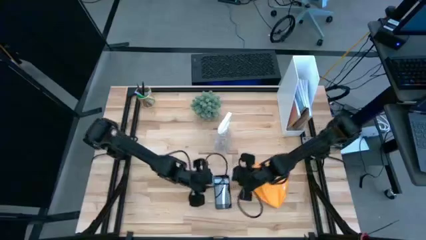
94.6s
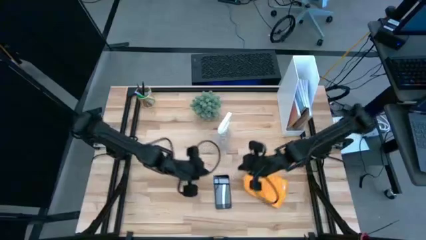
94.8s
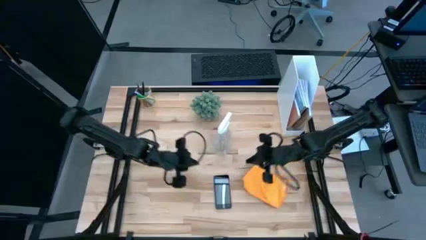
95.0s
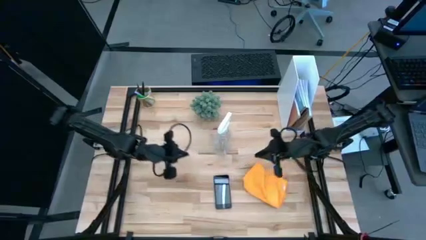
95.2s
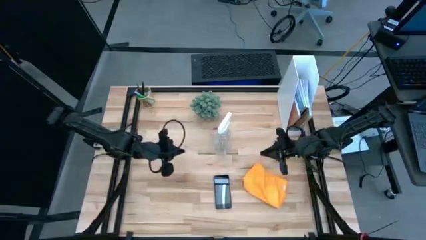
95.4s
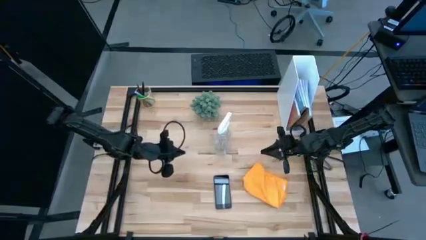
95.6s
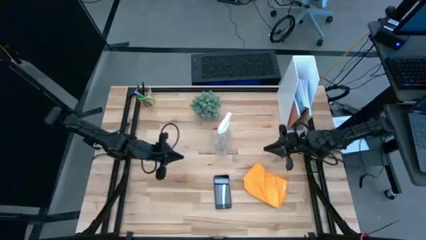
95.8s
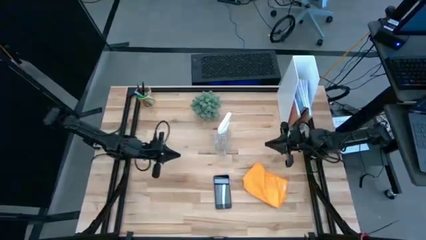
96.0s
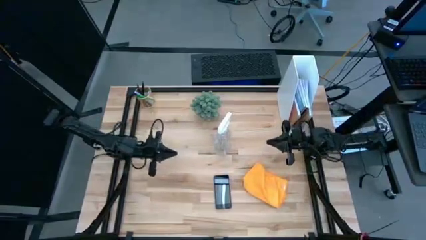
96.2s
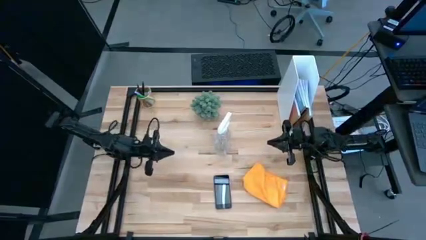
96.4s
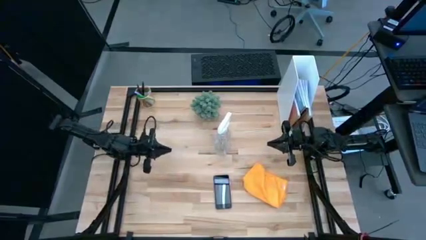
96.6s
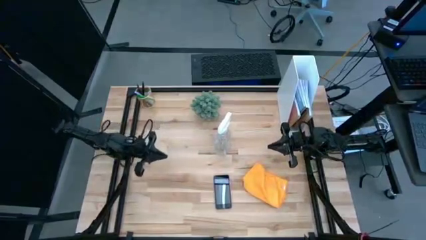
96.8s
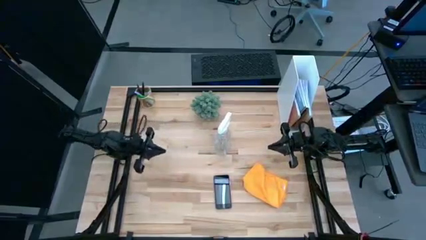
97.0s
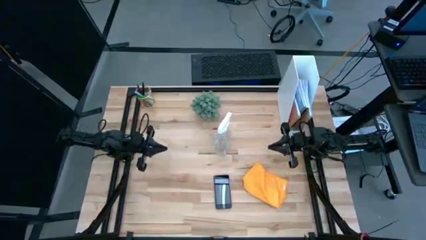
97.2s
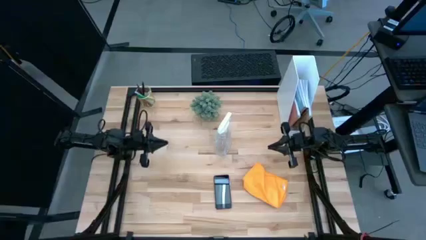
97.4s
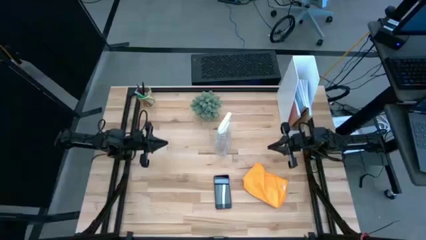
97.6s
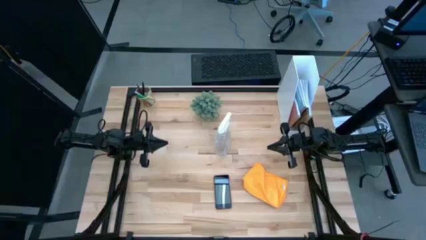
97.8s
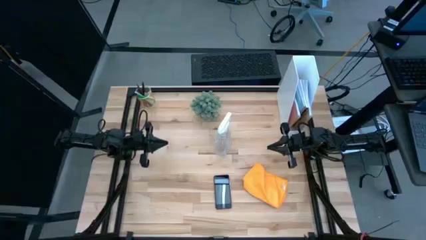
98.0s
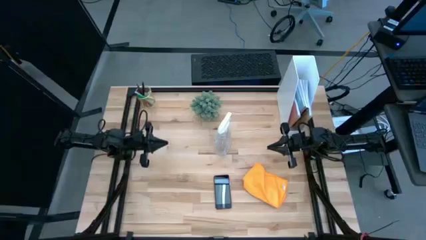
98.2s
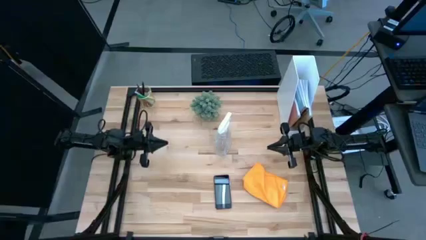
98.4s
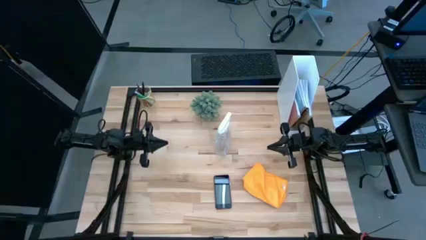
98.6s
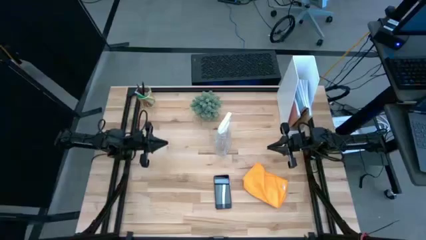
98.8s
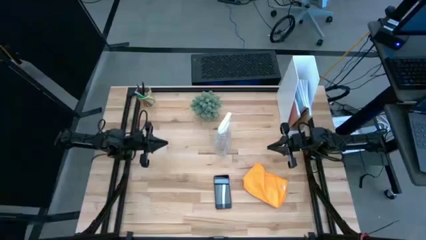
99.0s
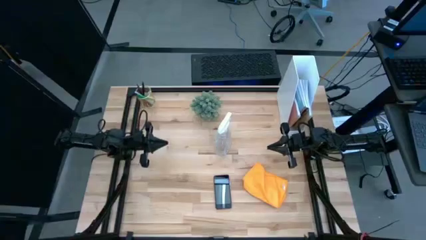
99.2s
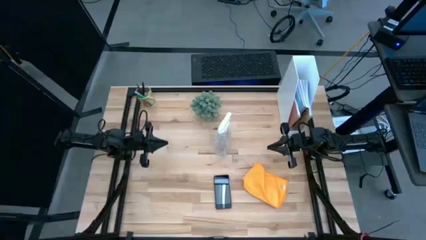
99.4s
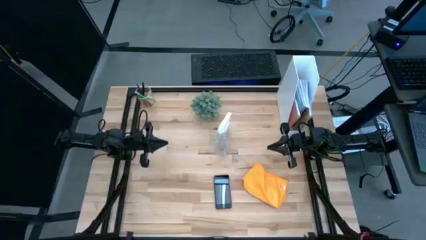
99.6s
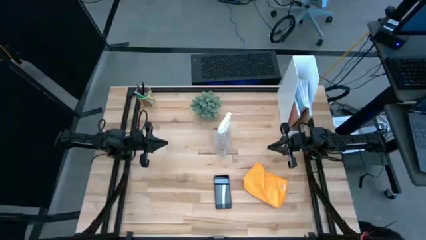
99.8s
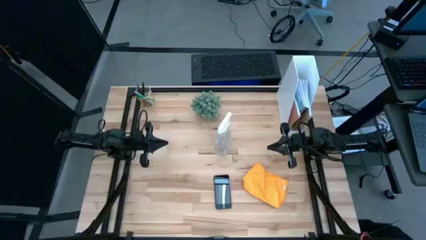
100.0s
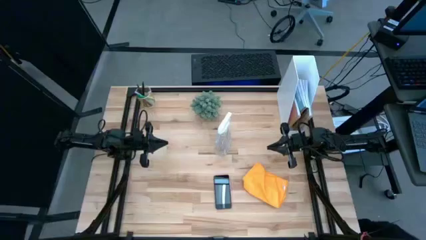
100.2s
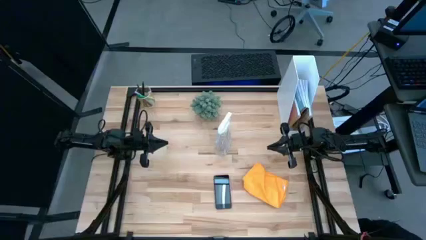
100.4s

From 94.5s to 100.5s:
Task: Apply microfiber cloth
Return to home position

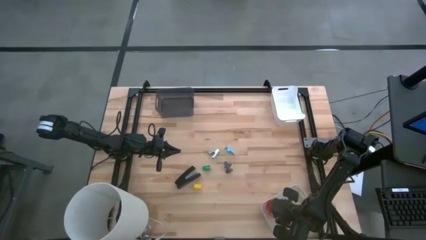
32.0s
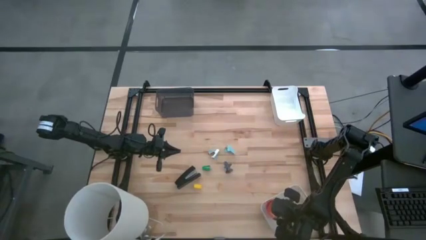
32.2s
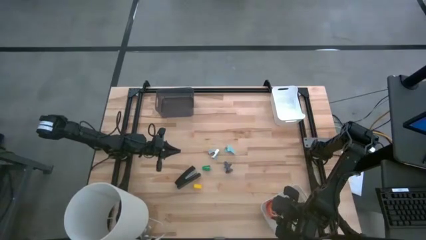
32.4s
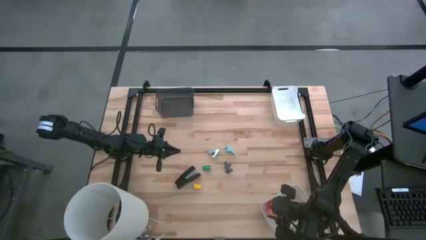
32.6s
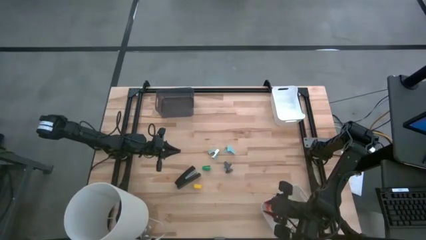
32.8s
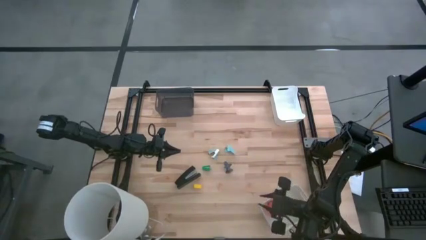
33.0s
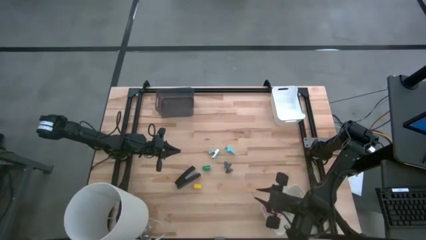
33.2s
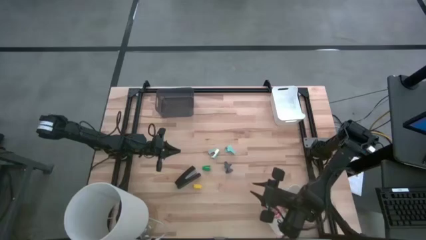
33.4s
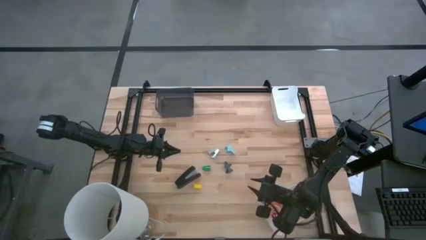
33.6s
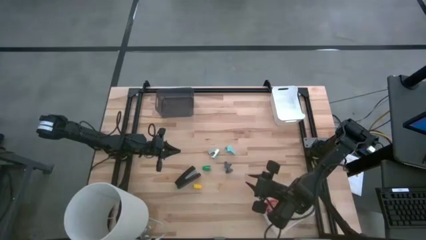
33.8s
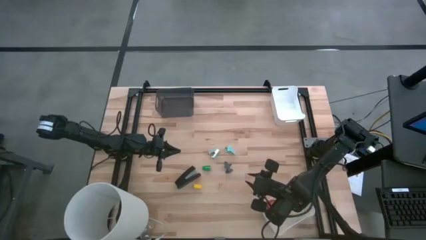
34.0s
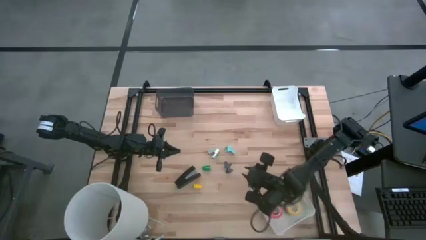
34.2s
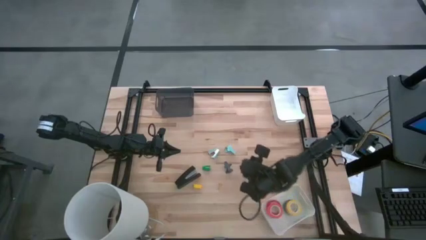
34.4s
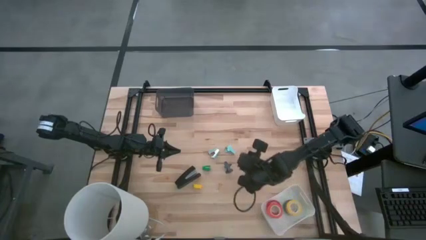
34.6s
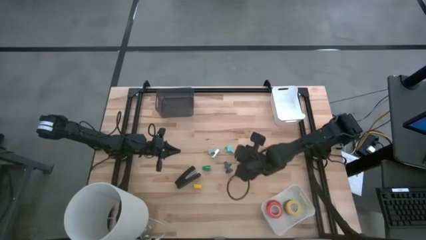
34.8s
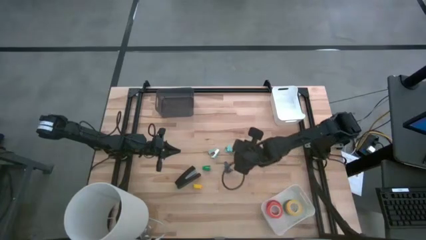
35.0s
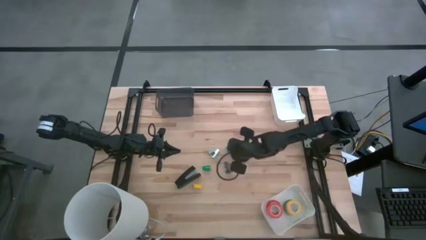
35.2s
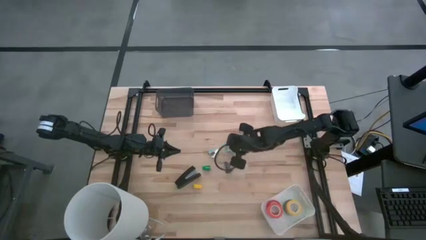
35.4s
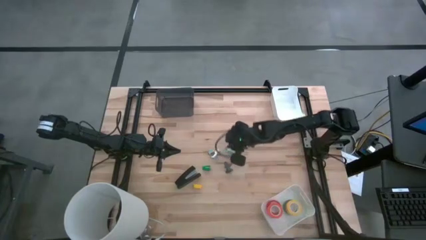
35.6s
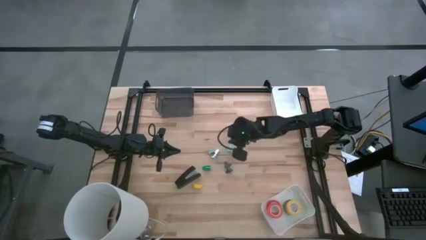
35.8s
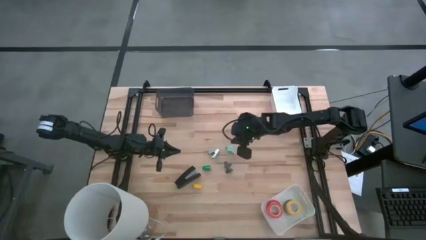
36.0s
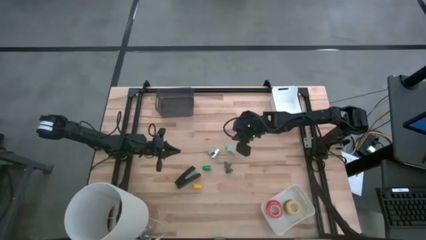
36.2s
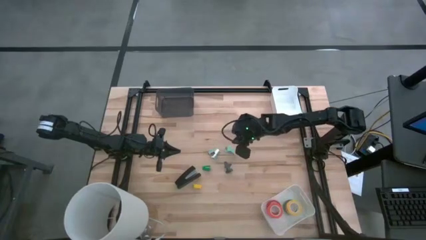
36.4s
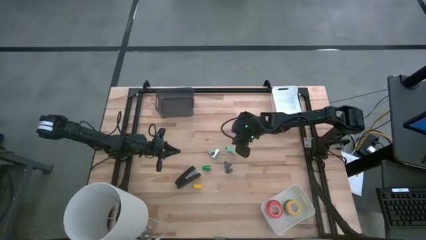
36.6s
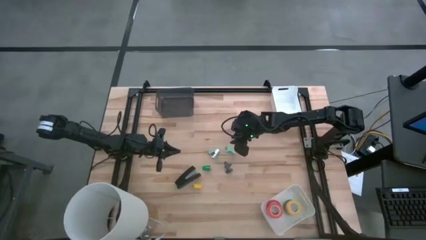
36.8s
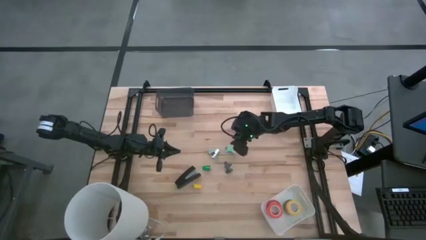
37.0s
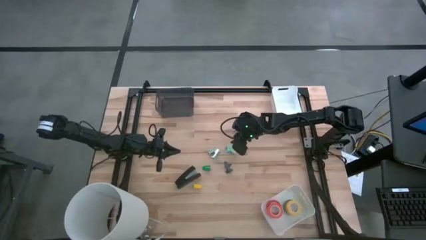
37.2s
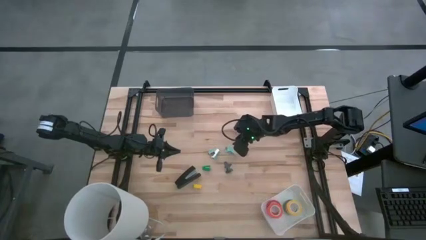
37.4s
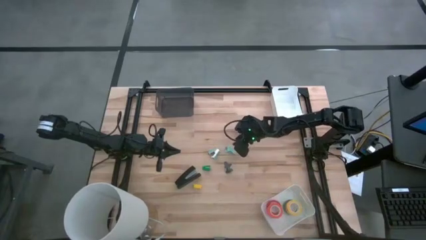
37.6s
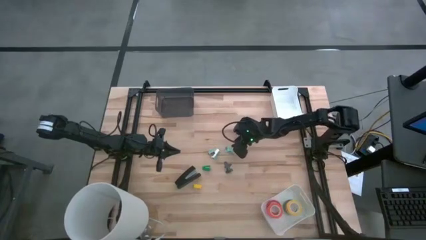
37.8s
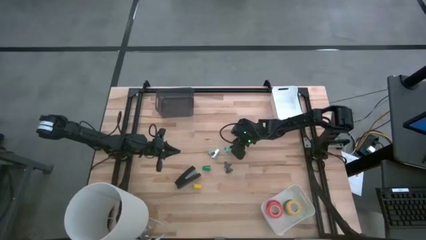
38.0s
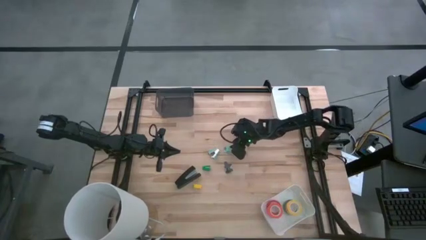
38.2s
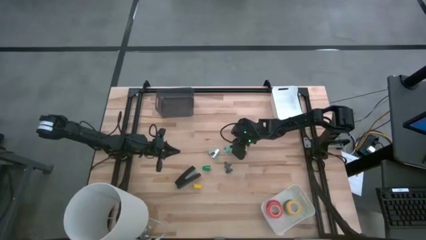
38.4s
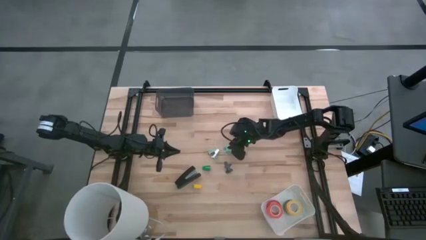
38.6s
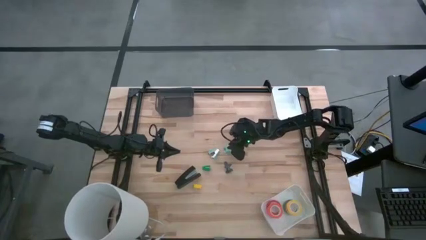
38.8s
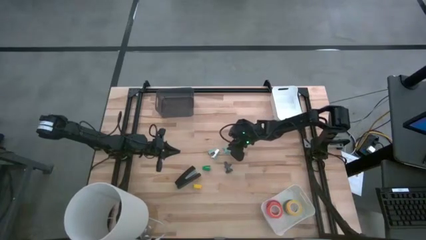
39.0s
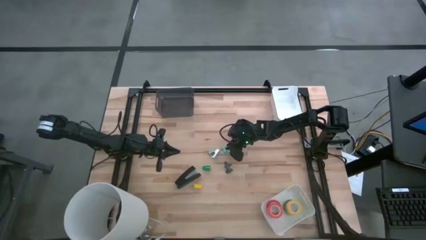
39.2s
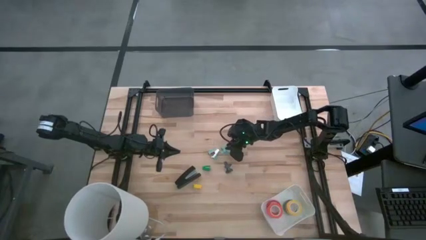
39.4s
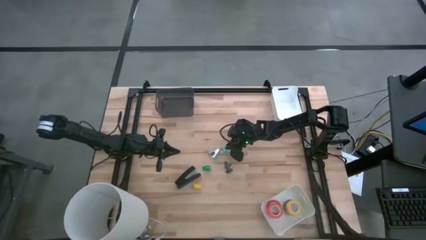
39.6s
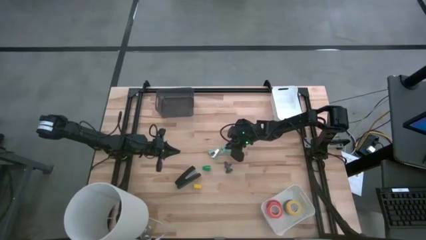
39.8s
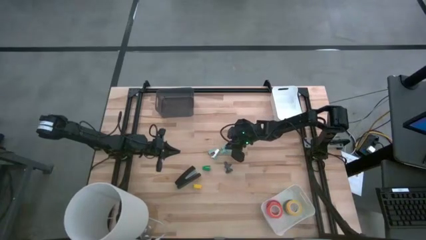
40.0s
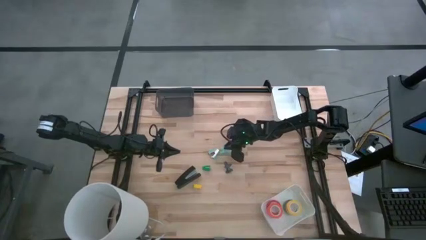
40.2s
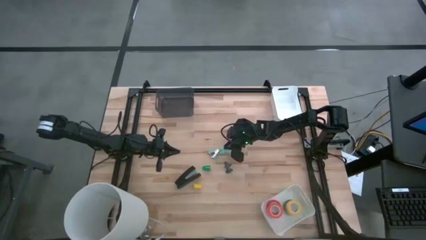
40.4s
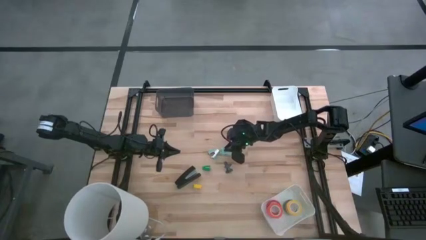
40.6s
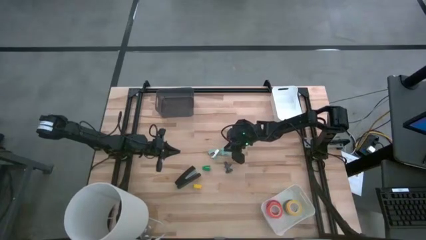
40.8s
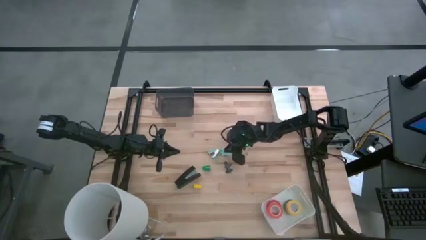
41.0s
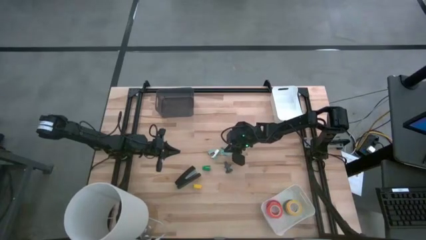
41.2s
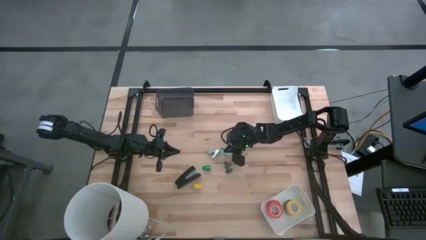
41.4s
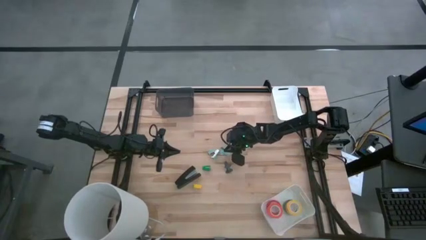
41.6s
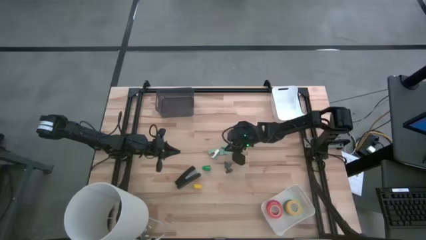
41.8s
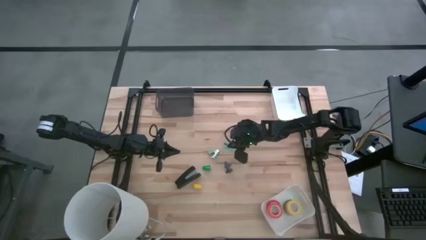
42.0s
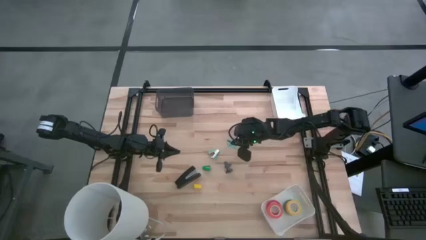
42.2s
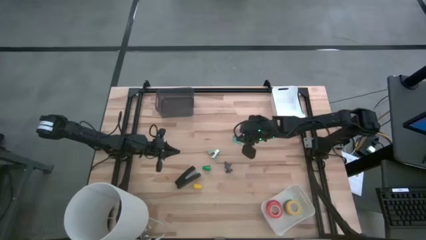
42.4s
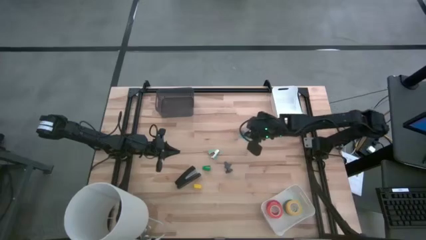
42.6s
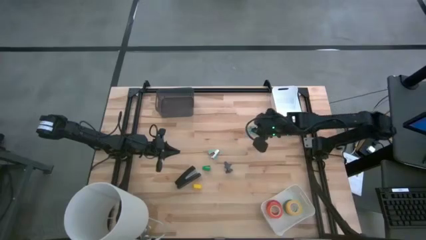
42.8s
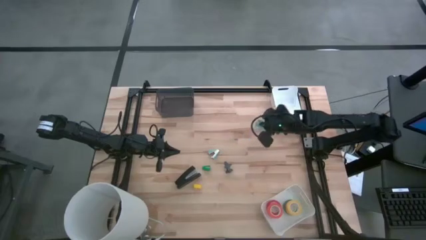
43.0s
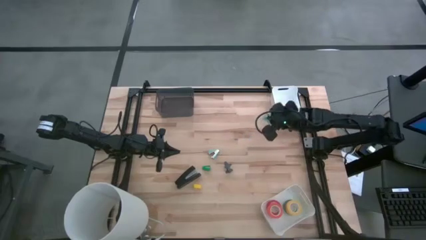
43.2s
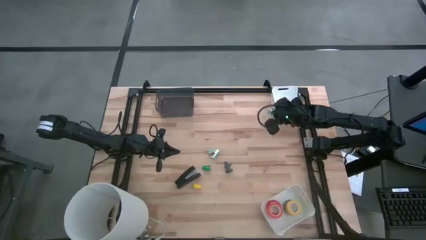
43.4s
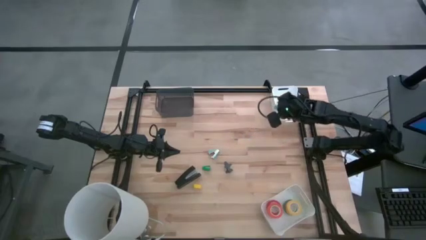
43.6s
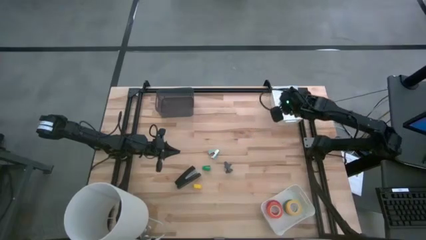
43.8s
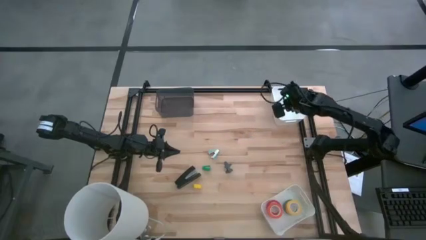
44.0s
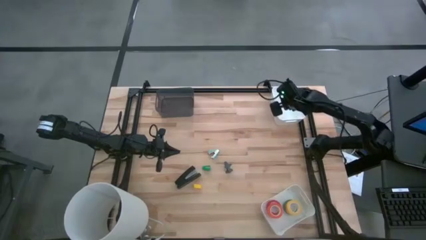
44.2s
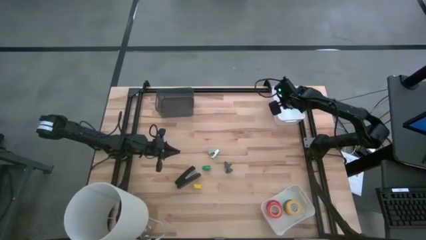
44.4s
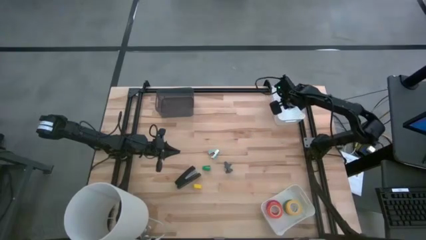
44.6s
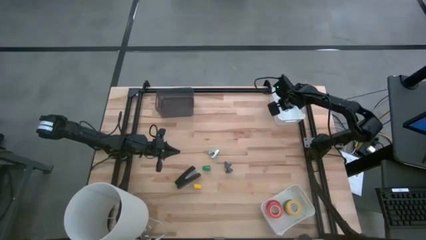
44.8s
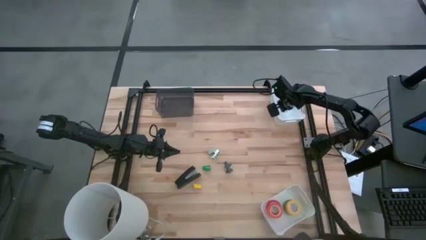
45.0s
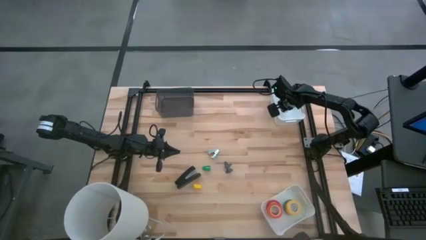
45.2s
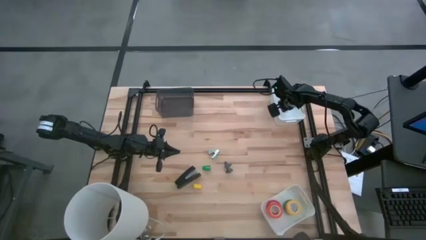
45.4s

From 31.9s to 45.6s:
Task: Pick and place Stapler, Stapler remover, tape
Put the right light blue staple remover into the top white bin
